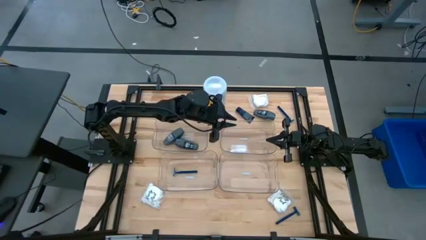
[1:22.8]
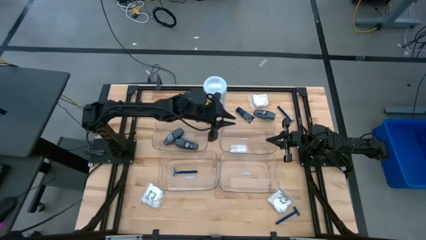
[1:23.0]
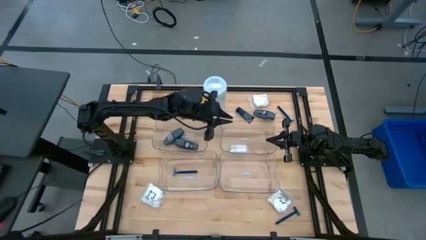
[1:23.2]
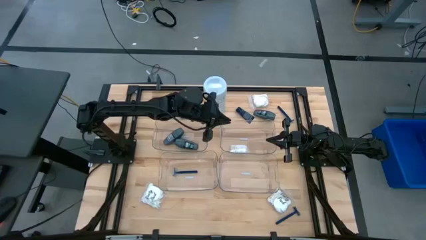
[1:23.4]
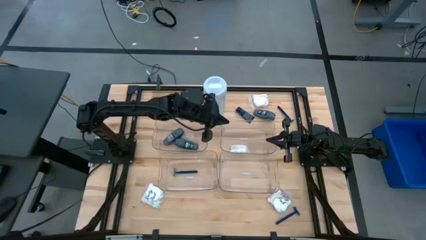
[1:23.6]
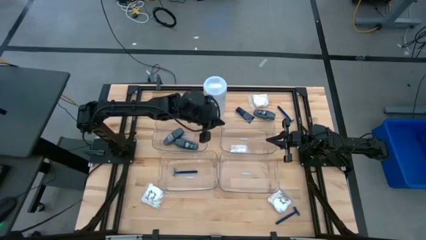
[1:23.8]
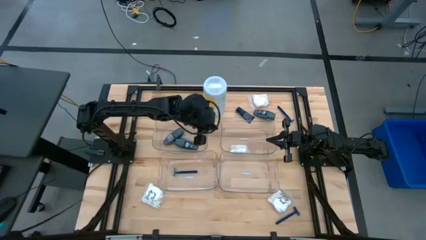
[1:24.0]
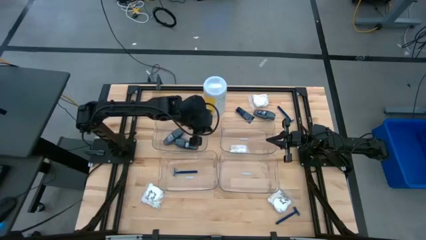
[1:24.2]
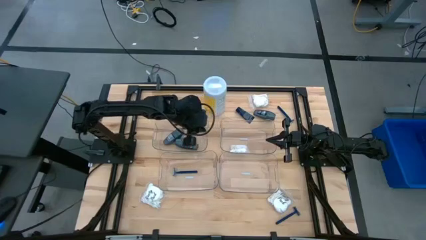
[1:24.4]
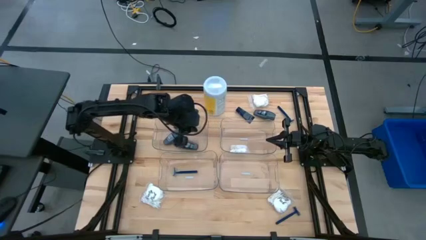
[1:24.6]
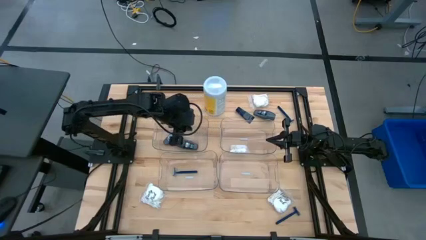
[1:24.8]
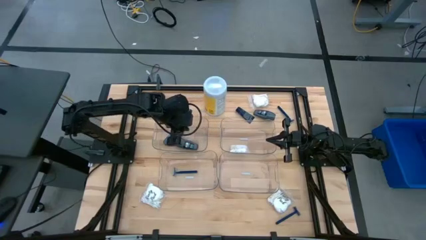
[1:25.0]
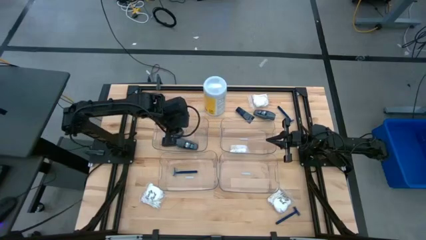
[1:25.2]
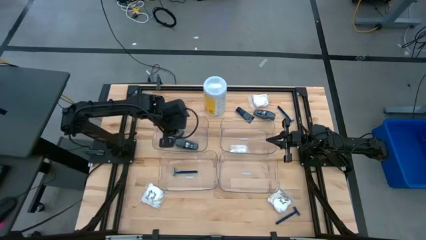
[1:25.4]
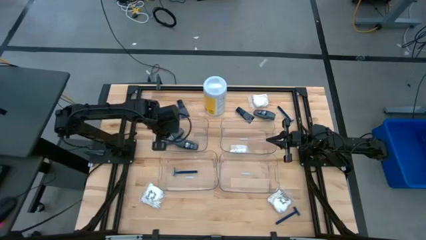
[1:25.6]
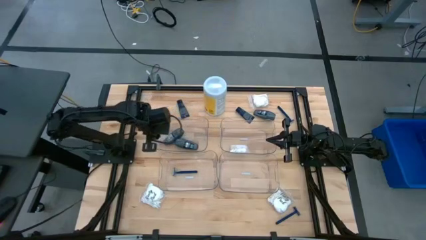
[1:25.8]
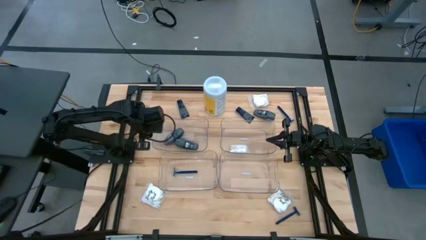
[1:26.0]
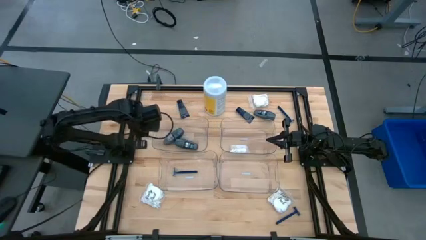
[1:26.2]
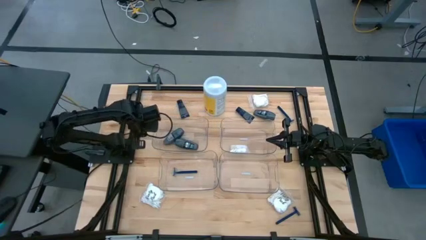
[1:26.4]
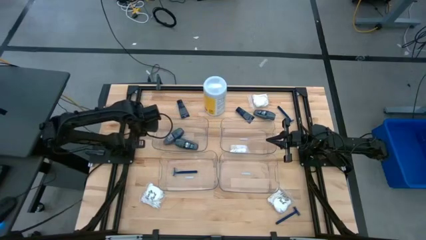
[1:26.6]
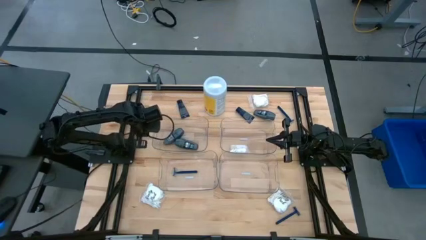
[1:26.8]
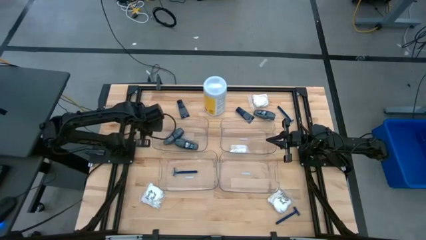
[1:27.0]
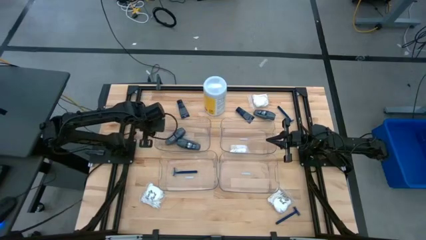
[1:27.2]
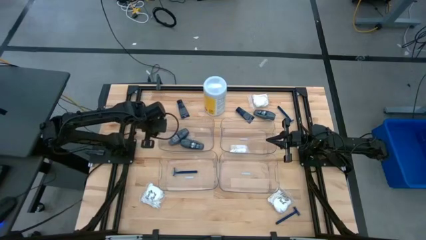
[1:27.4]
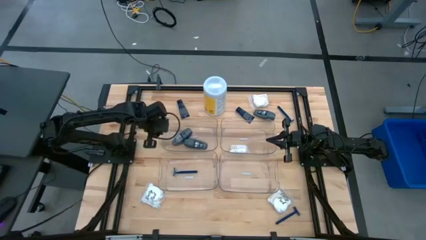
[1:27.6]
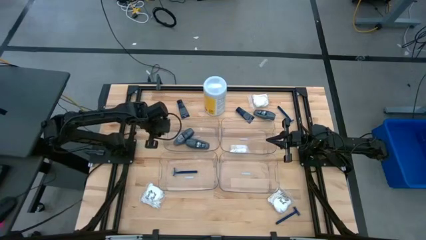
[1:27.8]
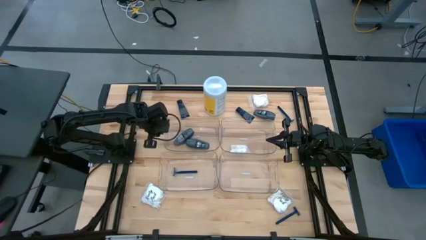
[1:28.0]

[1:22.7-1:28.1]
Task: Pick & Place Travel size toiletries
Adjust the top left transparent bin

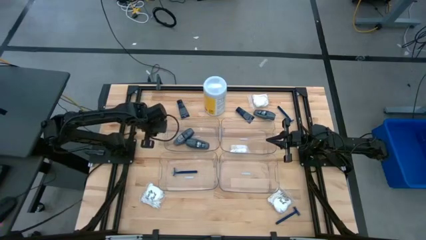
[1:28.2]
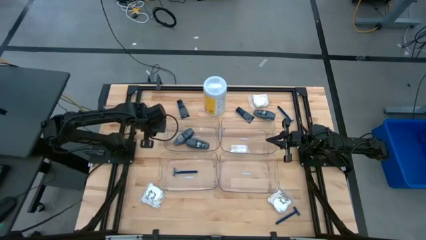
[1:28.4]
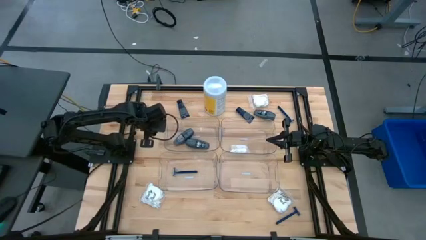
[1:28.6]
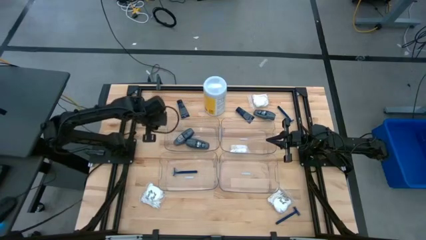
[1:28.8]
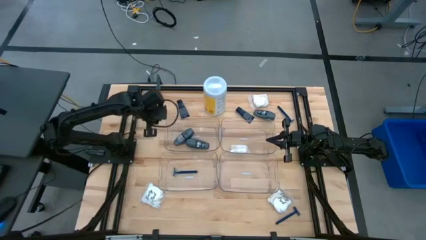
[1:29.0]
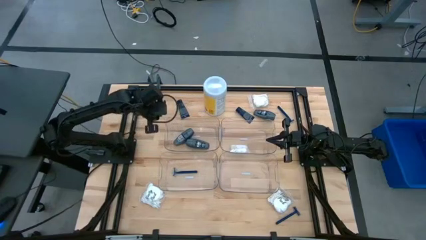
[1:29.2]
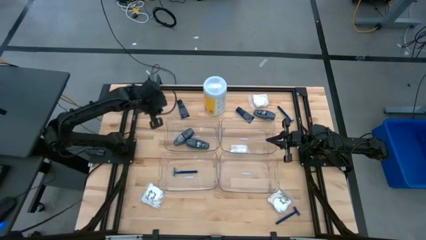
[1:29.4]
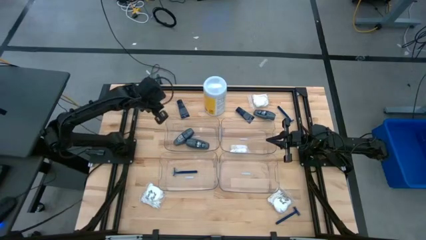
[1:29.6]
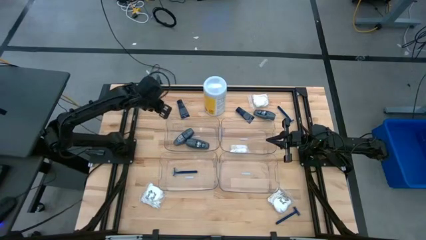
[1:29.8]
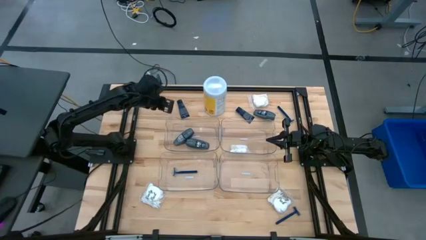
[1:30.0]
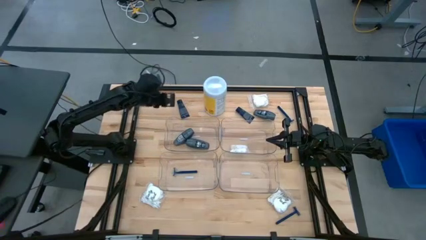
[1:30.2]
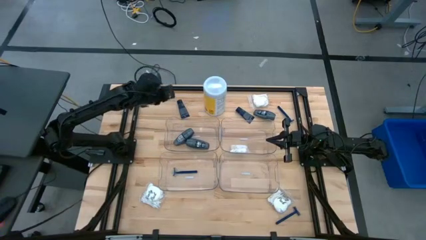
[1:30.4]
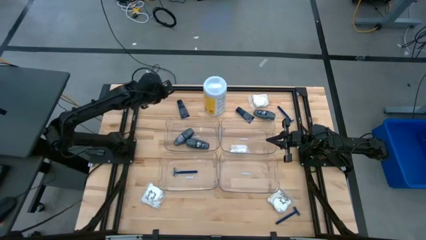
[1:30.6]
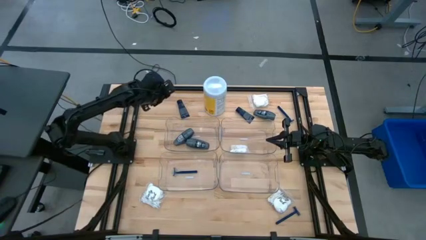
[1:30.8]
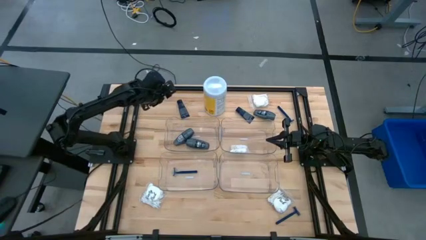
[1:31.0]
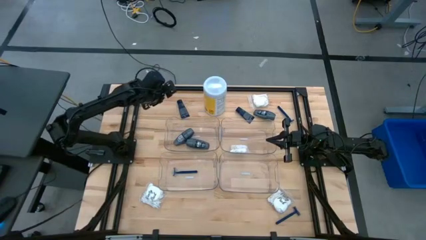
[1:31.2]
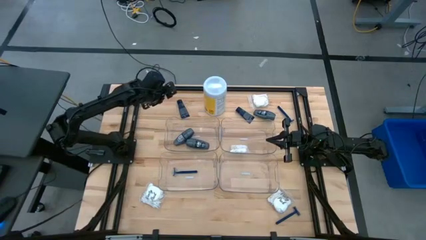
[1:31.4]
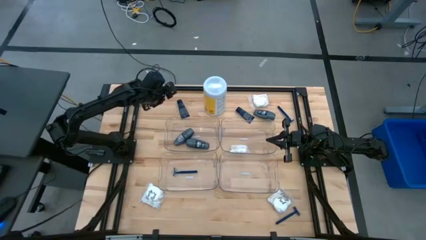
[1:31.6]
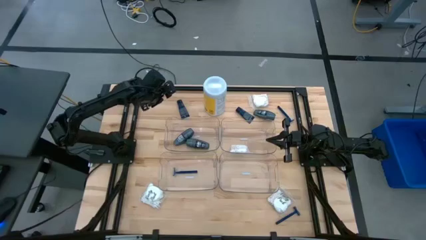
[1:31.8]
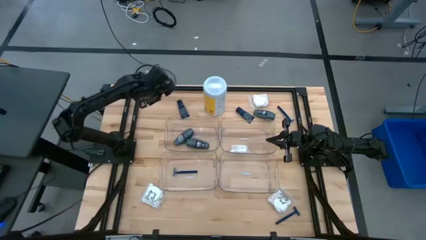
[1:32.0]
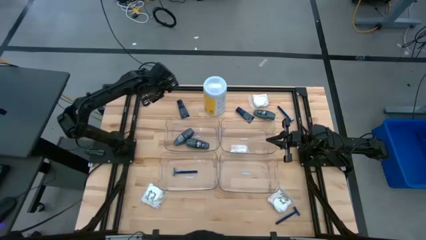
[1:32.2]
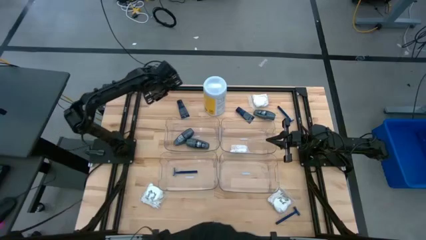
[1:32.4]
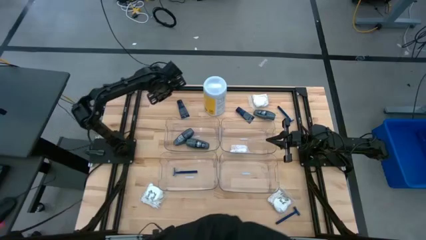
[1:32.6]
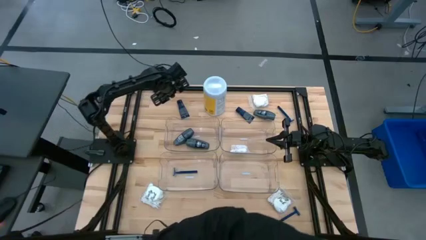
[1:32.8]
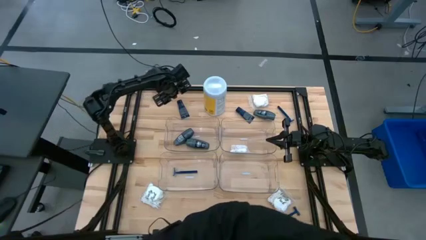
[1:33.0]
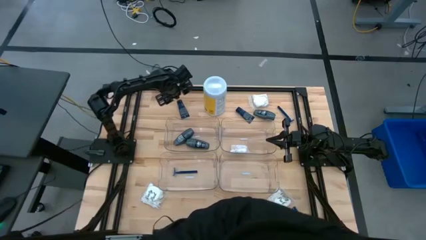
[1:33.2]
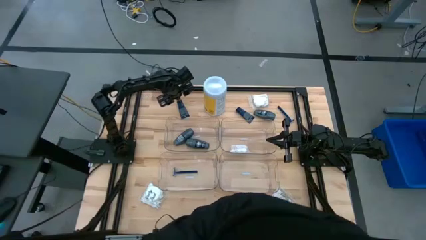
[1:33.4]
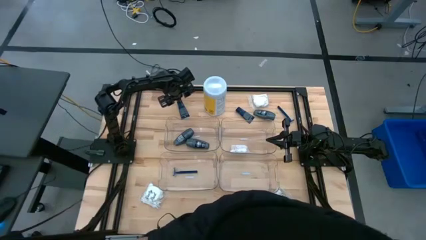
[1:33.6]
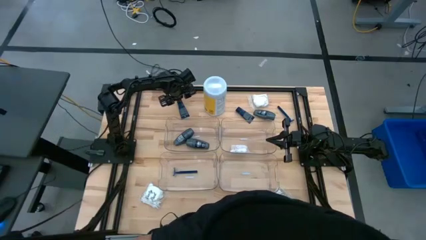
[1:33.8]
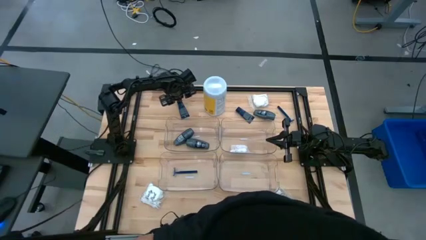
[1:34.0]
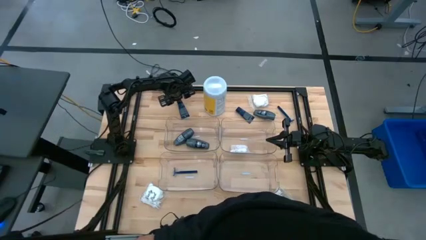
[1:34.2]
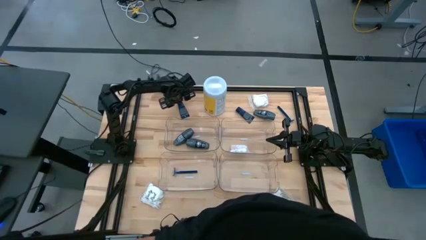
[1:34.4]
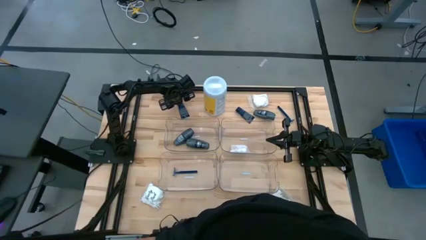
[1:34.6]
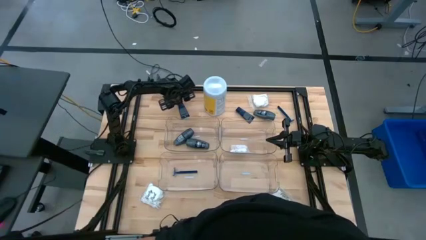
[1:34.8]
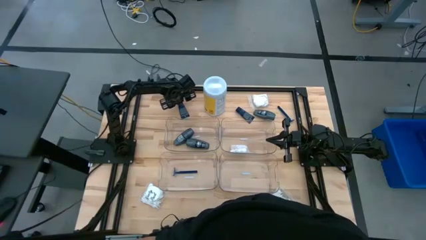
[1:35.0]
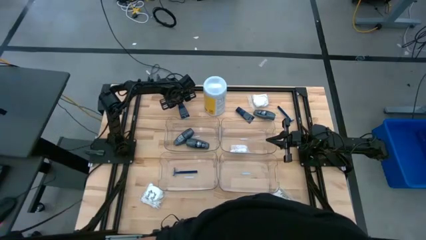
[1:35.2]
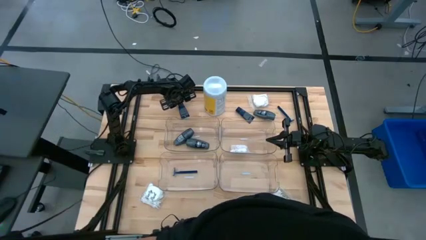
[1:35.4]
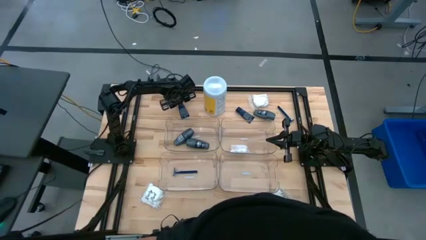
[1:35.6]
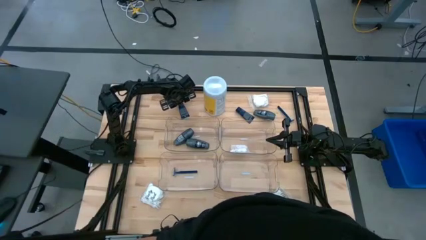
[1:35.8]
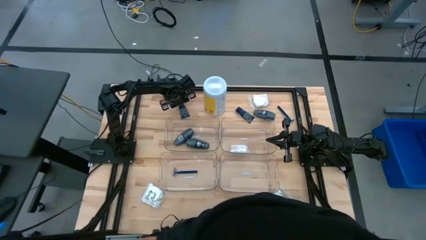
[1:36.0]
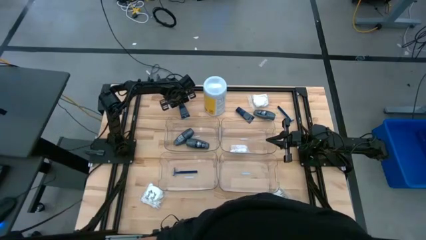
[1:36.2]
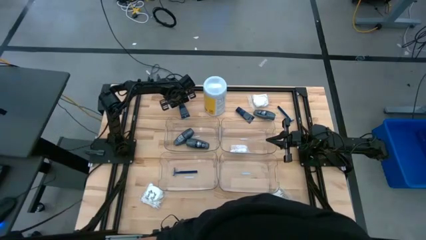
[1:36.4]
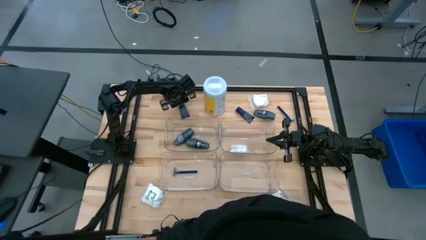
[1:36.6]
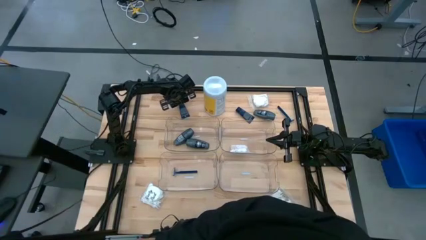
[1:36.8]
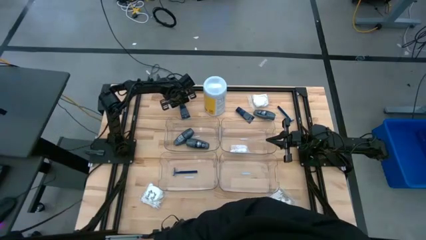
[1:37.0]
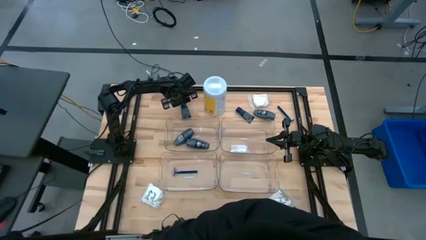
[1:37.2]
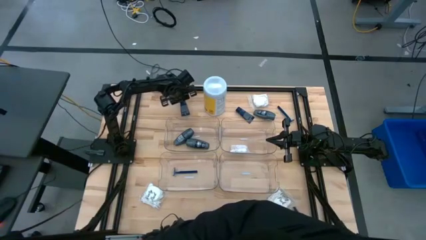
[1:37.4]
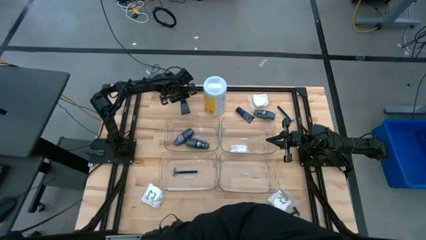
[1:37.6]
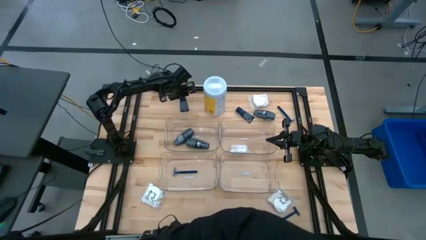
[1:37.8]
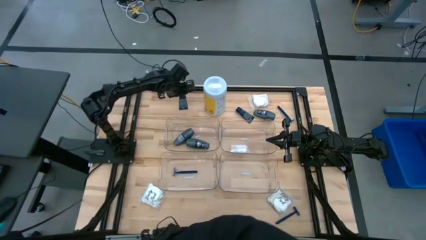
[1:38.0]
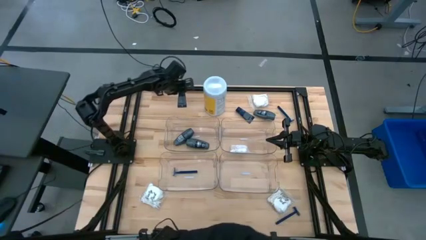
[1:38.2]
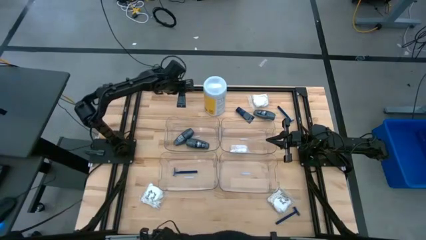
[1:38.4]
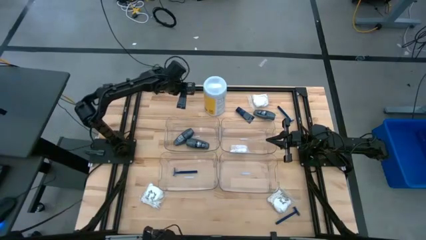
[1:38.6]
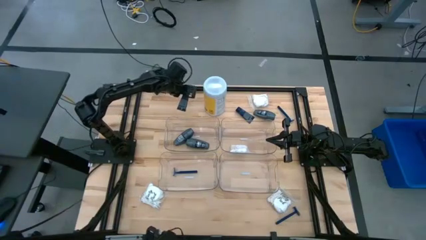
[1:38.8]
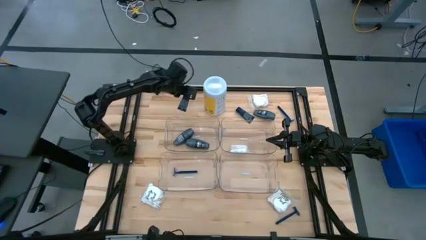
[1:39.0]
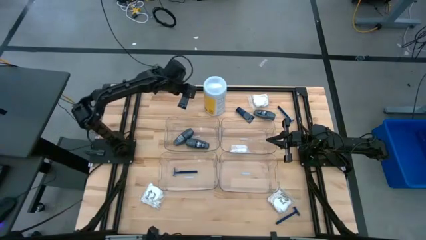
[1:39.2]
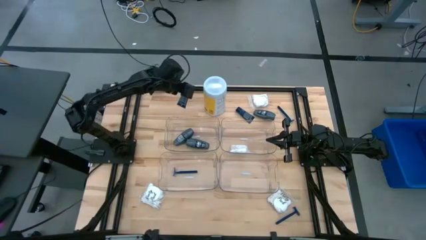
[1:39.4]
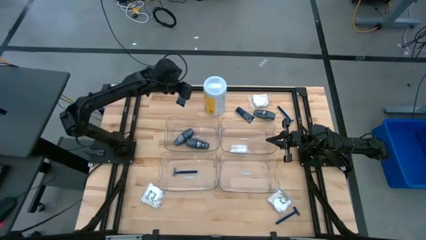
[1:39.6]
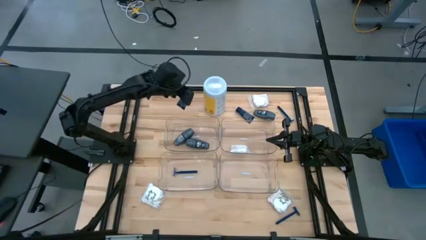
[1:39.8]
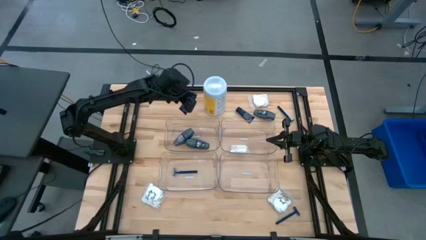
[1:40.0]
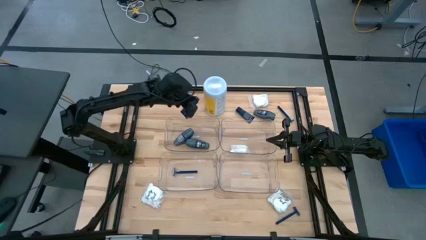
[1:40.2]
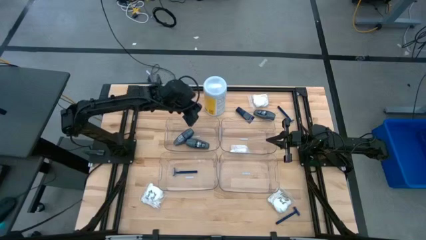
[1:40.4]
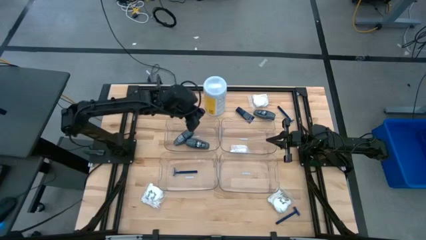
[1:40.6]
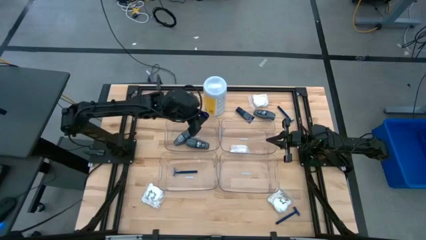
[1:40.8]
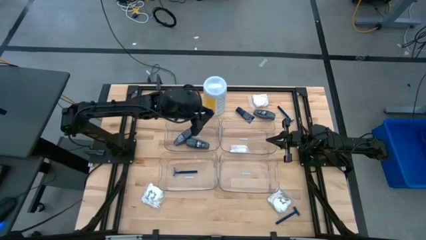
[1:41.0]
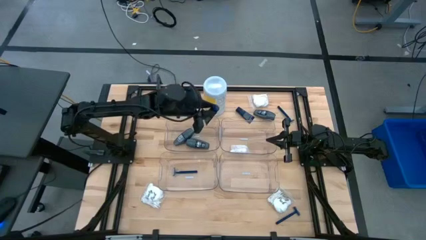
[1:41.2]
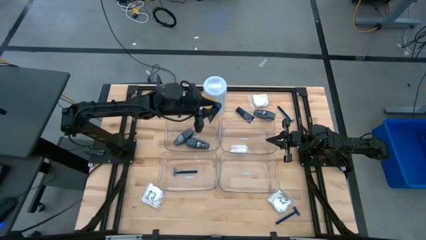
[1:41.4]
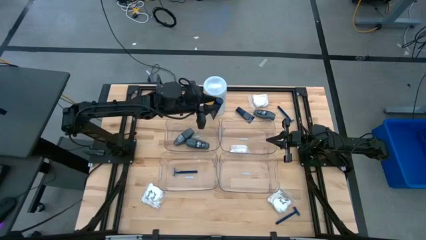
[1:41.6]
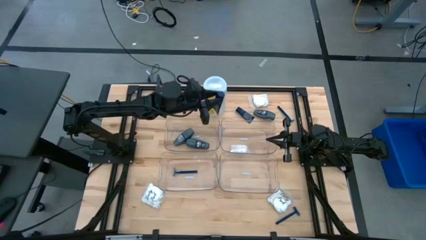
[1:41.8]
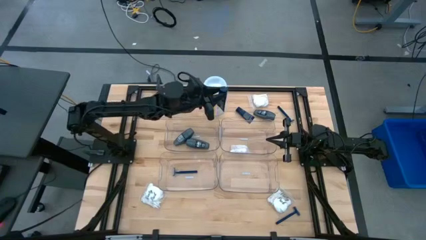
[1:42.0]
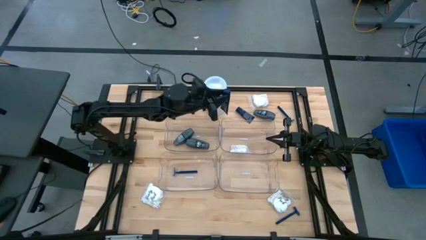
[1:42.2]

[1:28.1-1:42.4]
Put the left blue shaver cream into the bottom right transparent bin
